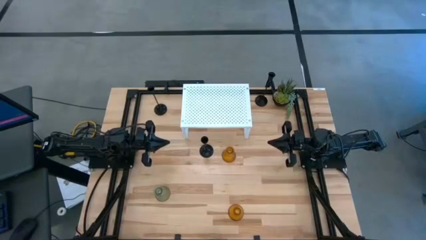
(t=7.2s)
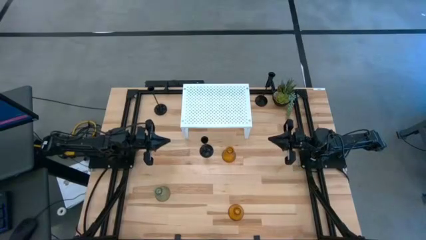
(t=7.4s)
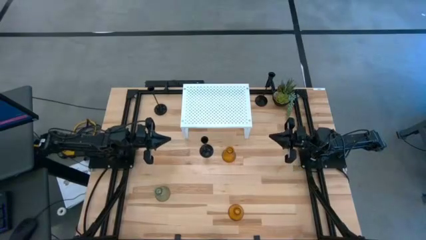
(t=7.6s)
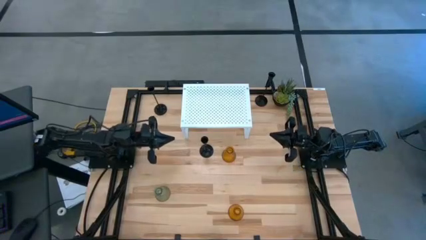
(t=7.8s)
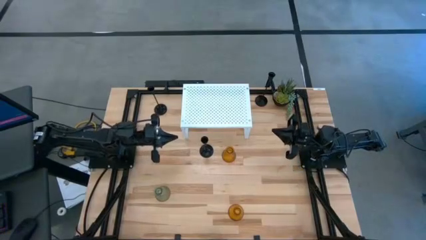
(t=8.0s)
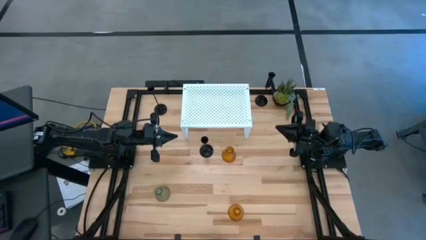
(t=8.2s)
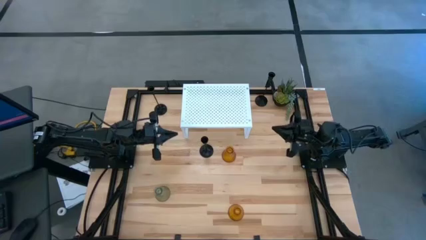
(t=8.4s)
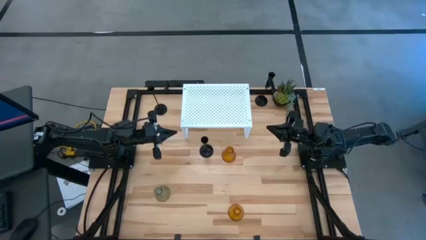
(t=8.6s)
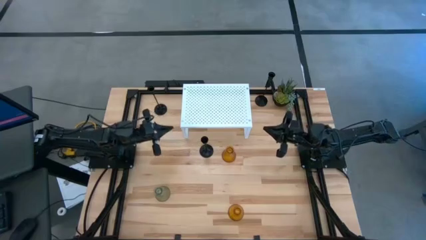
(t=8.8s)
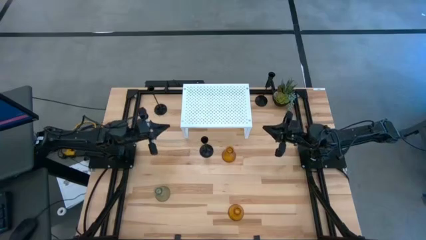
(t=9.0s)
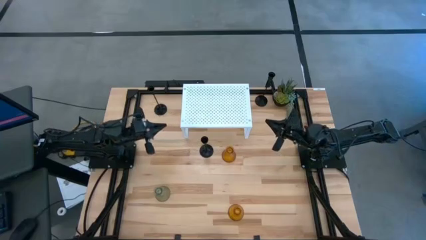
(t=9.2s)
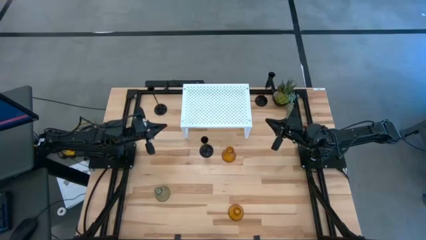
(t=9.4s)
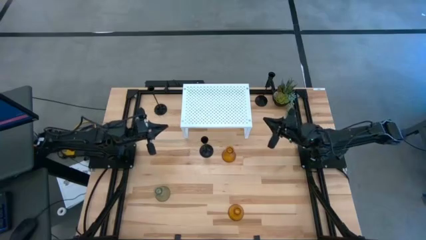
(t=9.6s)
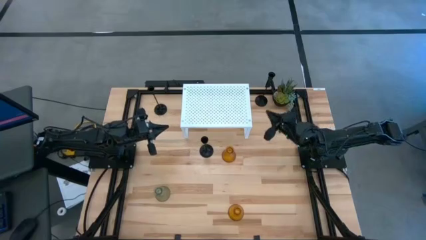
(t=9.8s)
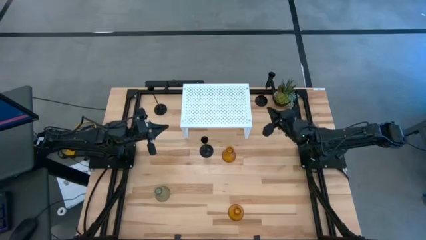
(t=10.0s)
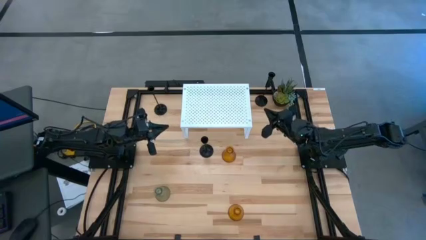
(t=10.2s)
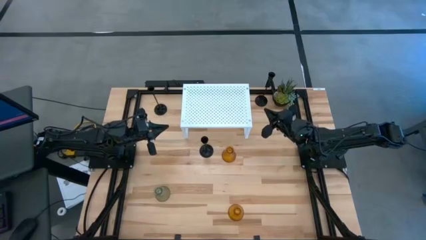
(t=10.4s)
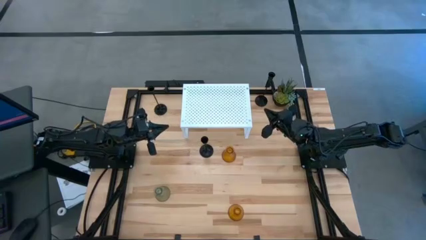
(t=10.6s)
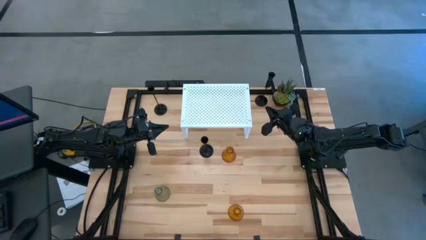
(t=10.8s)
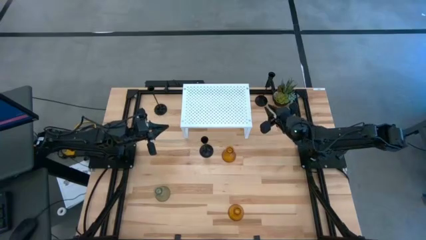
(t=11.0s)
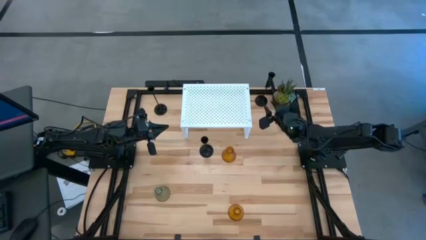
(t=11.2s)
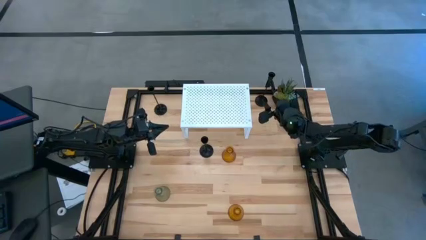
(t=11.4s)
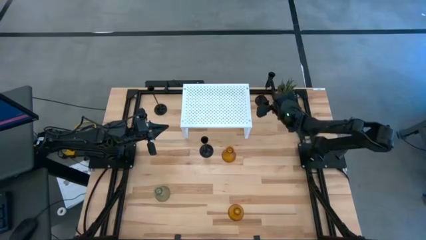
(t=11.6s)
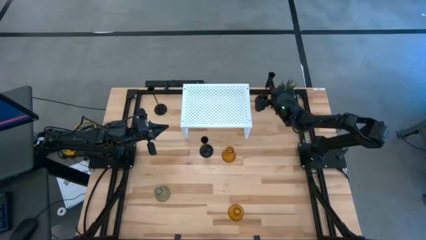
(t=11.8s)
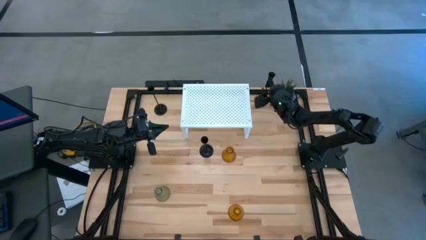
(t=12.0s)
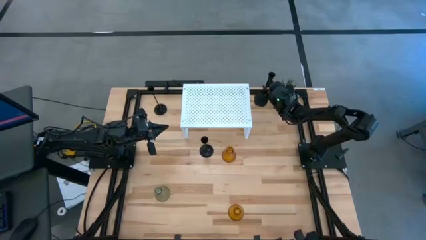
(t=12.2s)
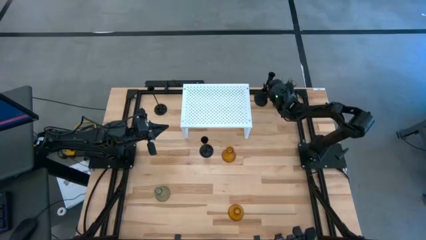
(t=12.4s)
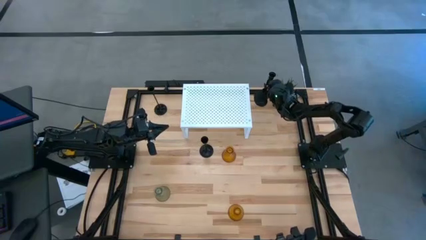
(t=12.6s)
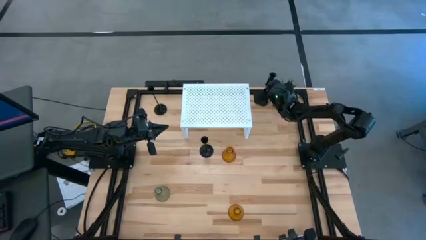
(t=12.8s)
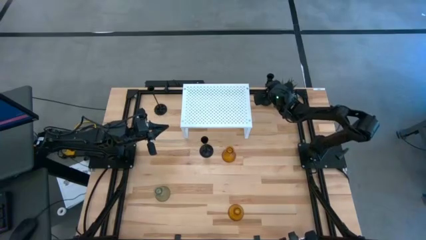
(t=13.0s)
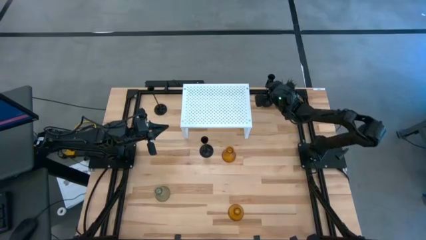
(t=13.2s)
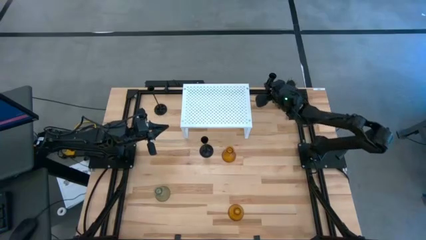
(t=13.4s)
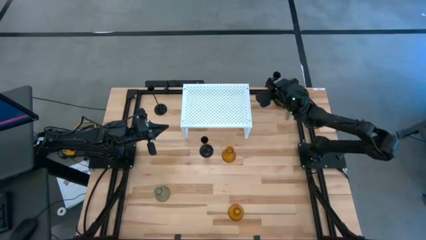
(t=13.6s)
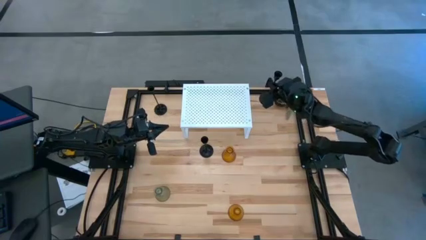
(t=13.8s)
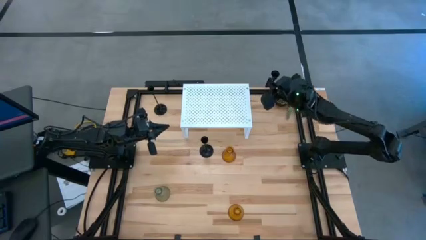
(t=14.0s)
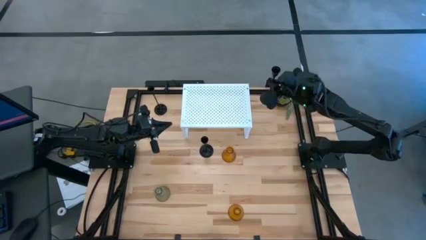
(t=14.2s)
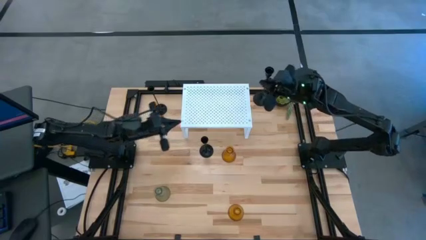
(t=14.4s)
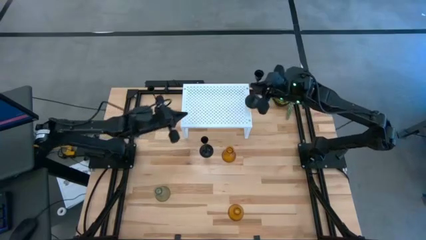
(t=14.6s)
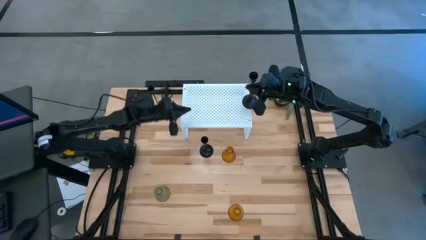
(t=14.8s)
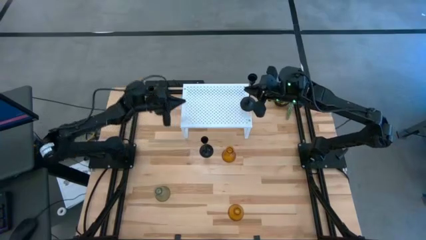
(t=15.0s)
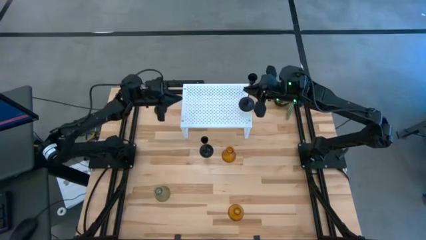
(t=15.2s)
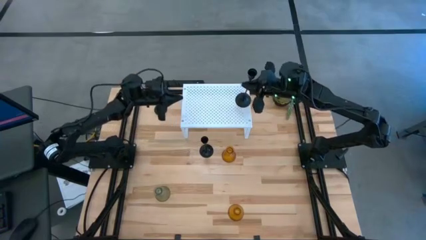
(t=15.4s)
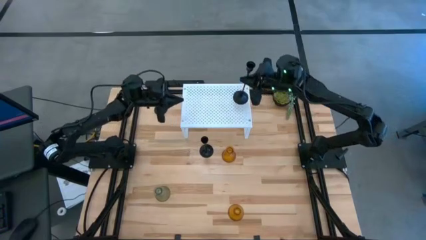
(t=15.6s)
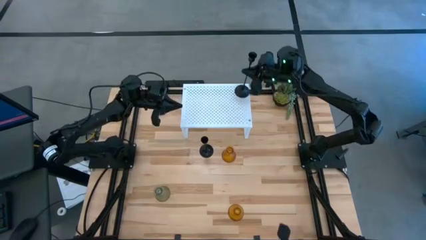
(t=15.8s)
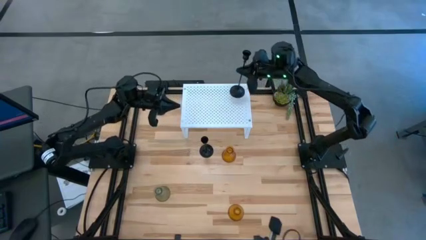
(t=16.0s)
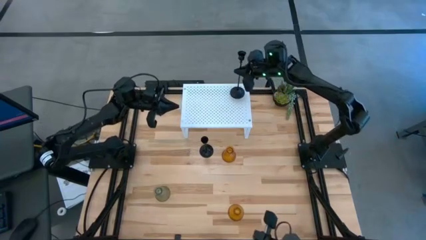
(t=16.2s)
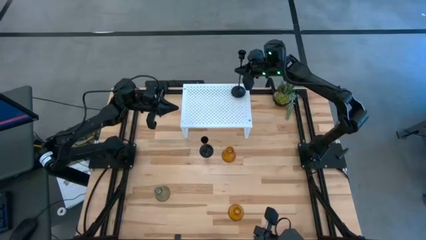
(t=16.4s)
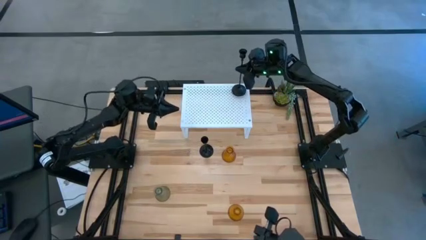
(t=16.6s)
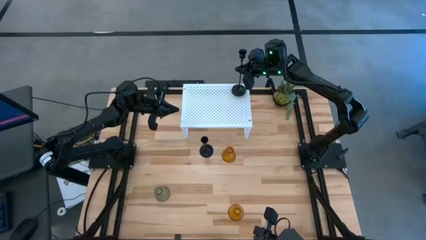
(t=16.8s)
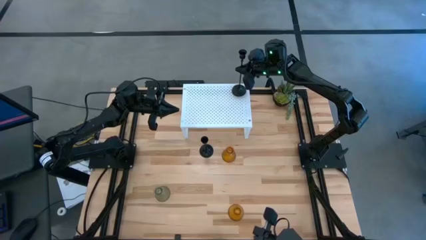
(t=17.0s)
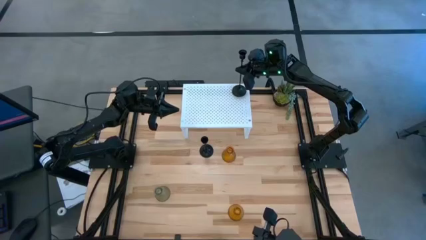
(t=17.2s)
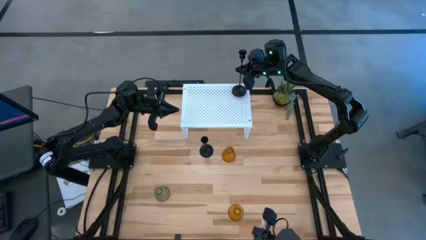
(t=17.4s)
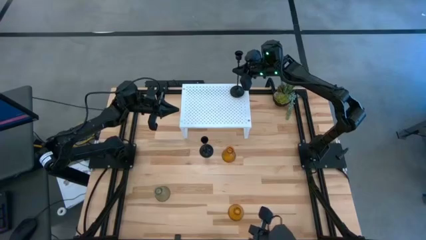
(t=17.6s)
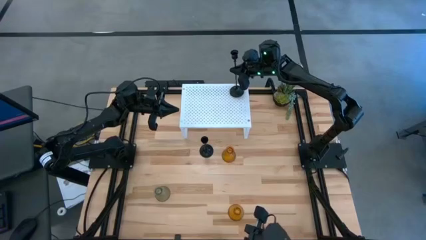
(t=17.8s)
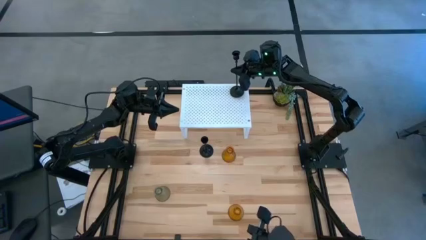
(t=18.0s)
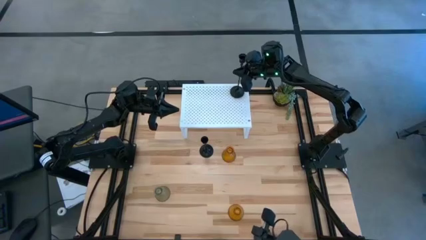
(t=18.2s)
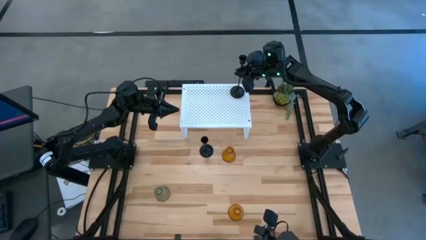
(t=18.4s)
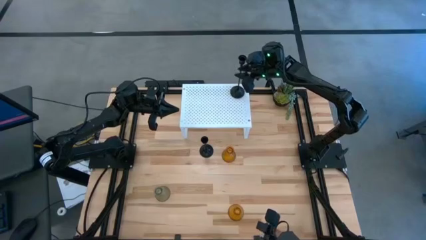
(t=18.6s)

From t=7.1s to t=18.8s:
Task: Pick & Place candle stick holders
Put the top right black candle holder on the shelf
